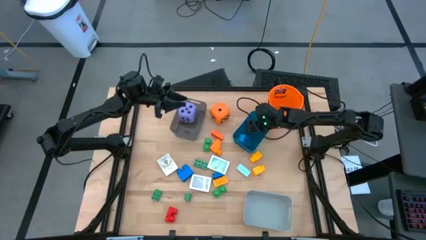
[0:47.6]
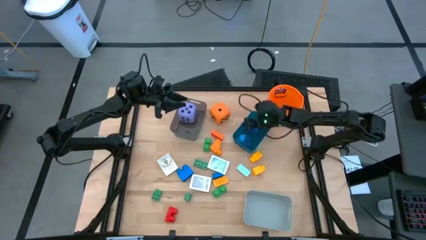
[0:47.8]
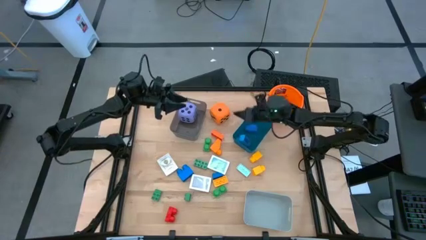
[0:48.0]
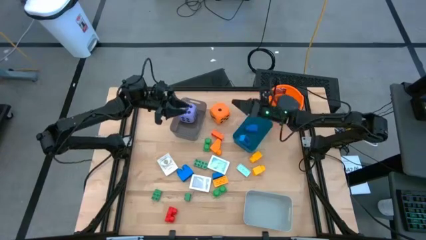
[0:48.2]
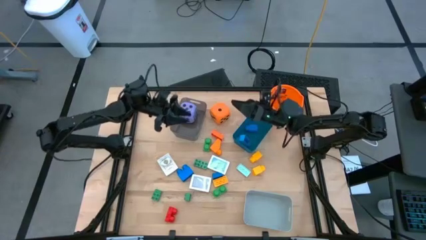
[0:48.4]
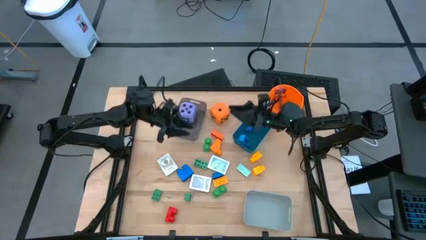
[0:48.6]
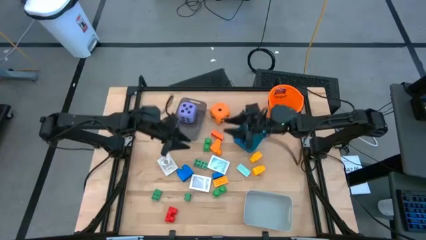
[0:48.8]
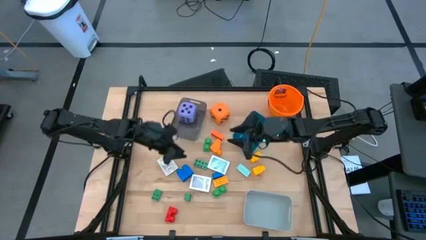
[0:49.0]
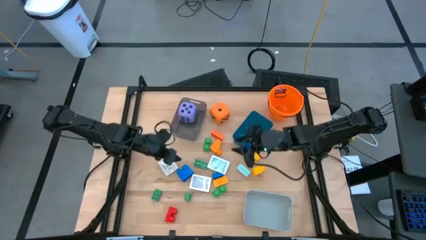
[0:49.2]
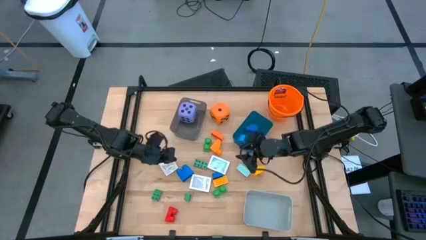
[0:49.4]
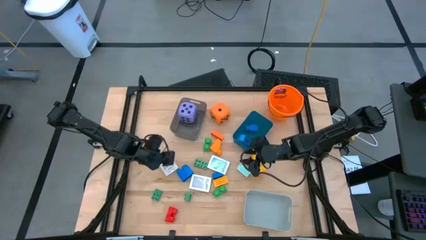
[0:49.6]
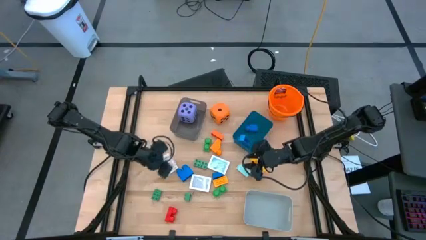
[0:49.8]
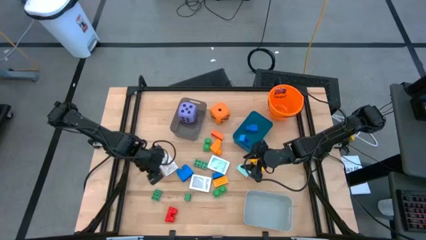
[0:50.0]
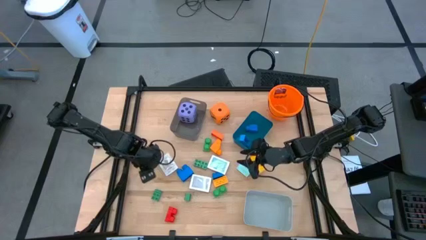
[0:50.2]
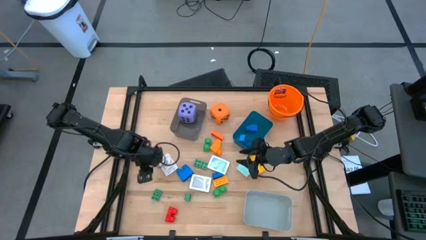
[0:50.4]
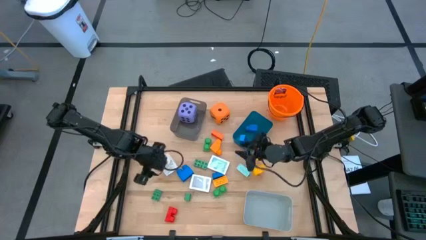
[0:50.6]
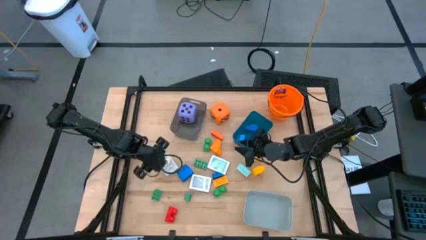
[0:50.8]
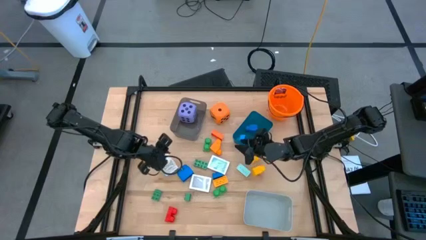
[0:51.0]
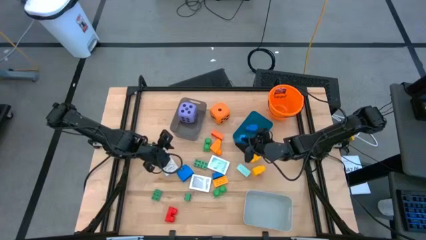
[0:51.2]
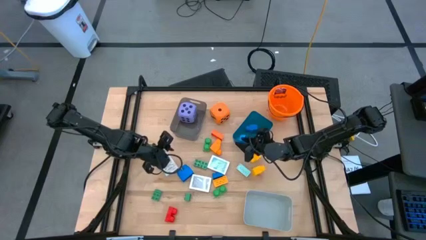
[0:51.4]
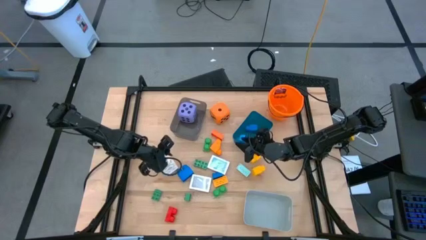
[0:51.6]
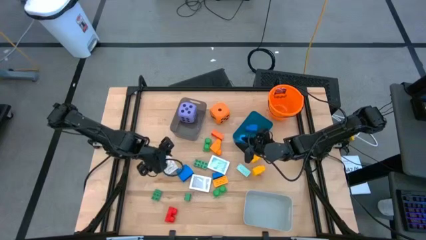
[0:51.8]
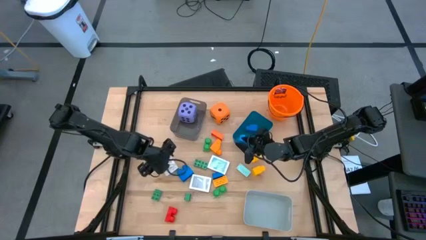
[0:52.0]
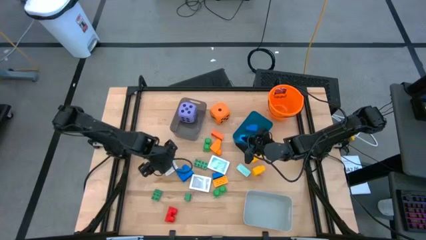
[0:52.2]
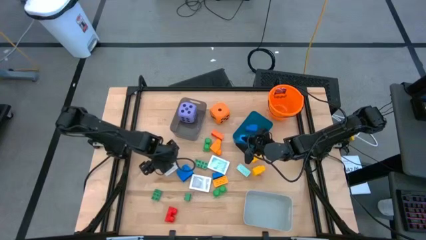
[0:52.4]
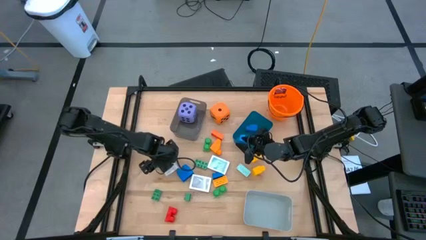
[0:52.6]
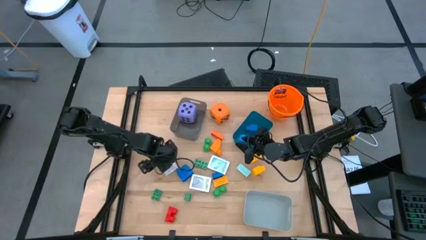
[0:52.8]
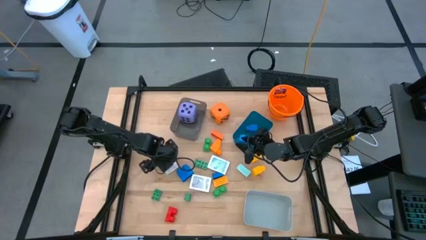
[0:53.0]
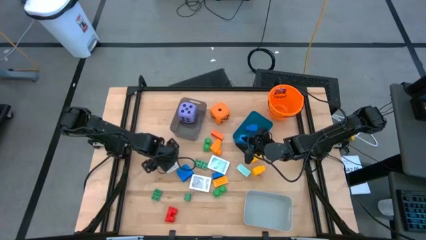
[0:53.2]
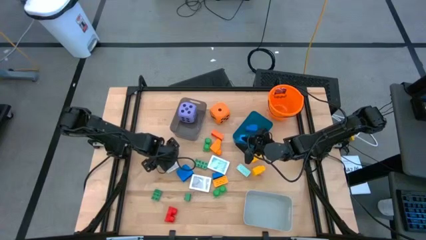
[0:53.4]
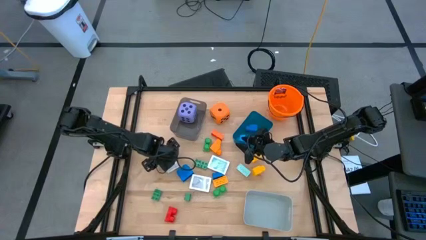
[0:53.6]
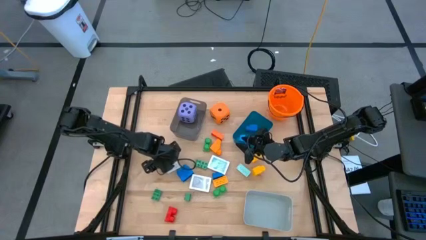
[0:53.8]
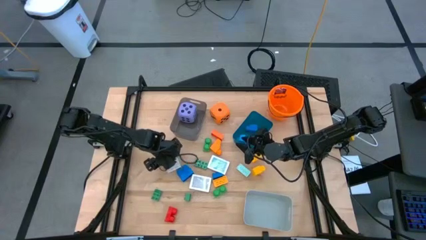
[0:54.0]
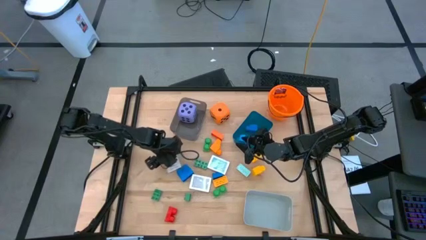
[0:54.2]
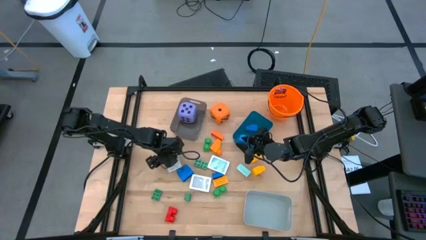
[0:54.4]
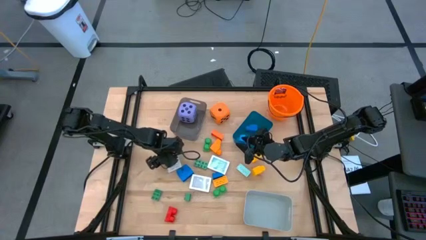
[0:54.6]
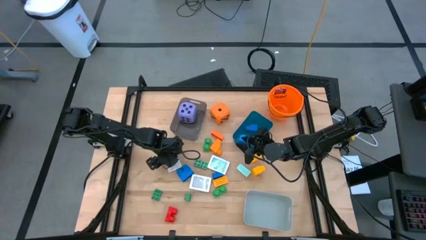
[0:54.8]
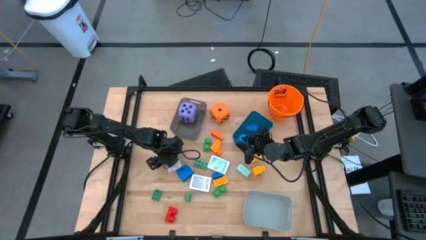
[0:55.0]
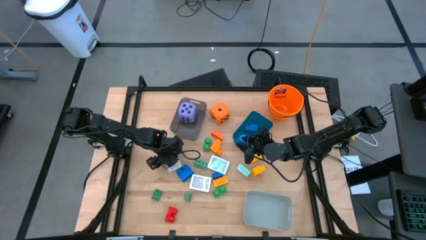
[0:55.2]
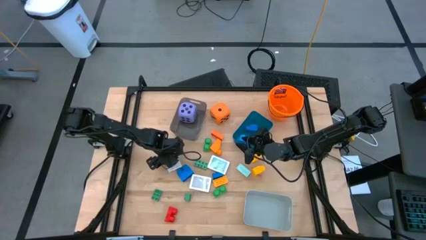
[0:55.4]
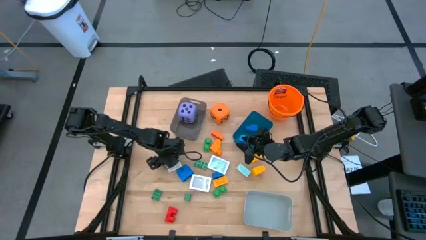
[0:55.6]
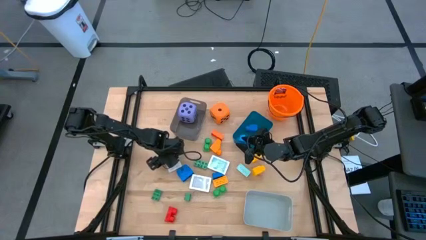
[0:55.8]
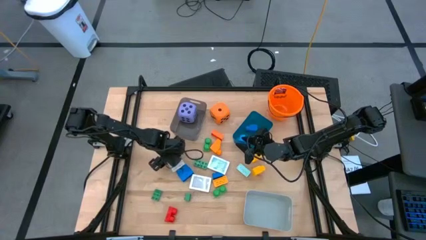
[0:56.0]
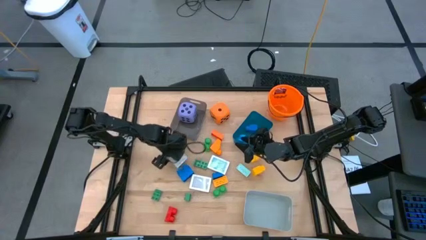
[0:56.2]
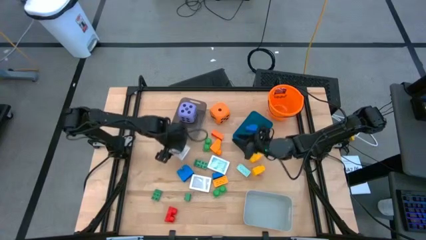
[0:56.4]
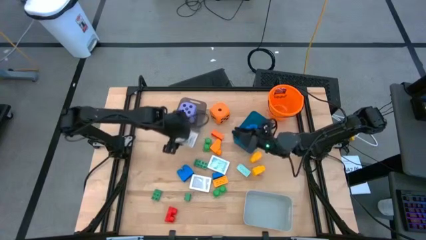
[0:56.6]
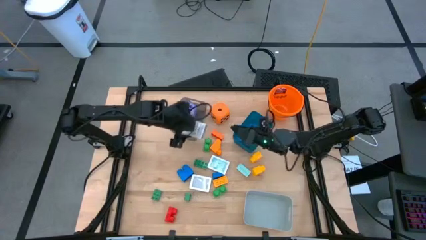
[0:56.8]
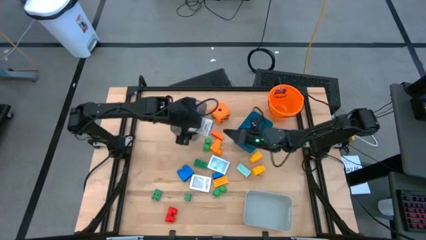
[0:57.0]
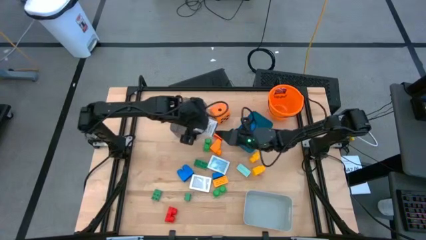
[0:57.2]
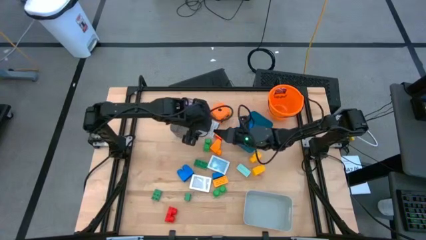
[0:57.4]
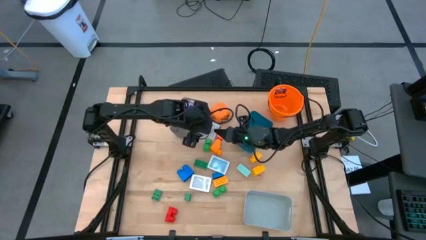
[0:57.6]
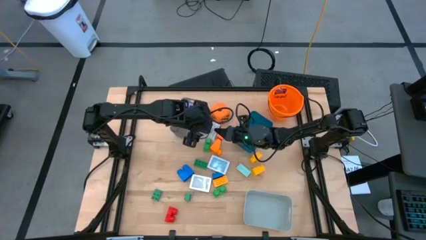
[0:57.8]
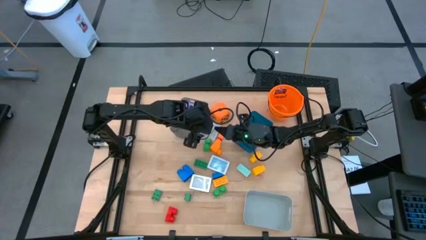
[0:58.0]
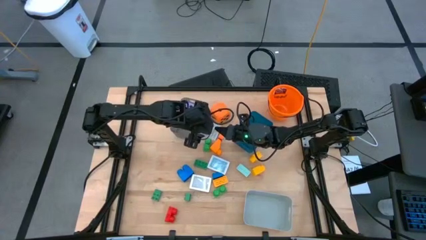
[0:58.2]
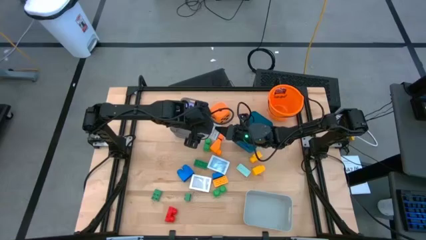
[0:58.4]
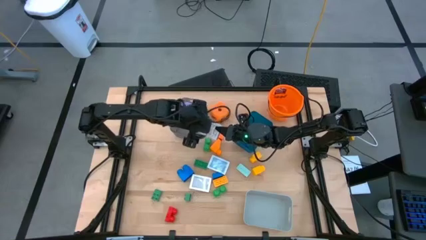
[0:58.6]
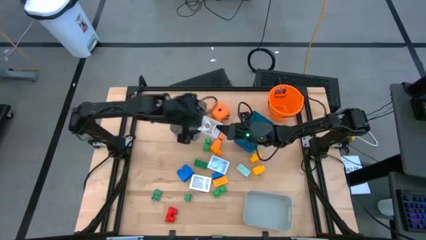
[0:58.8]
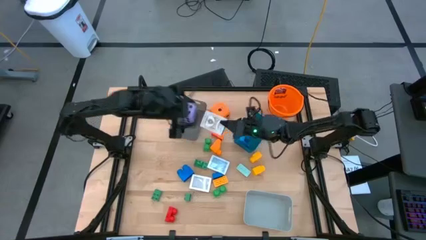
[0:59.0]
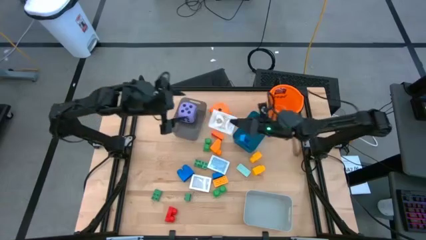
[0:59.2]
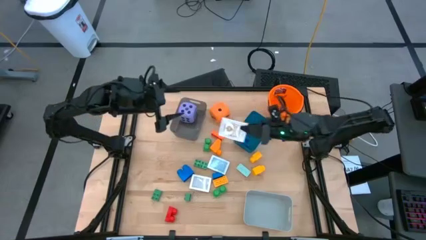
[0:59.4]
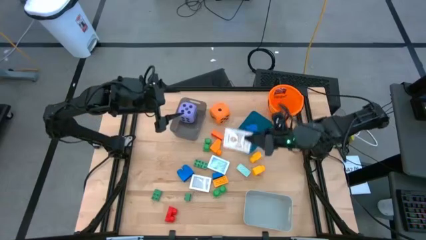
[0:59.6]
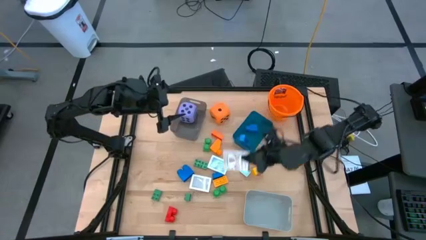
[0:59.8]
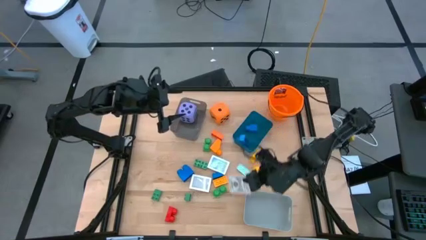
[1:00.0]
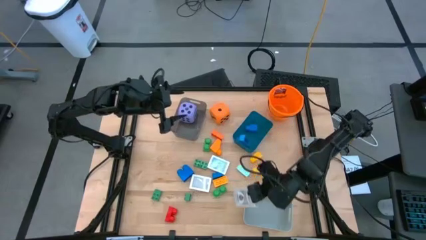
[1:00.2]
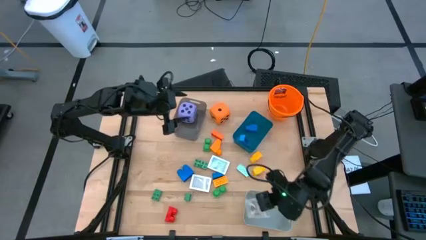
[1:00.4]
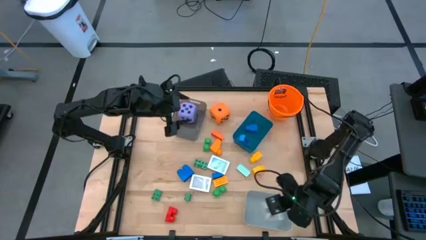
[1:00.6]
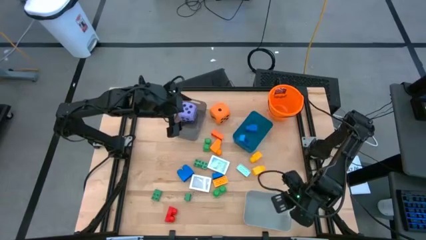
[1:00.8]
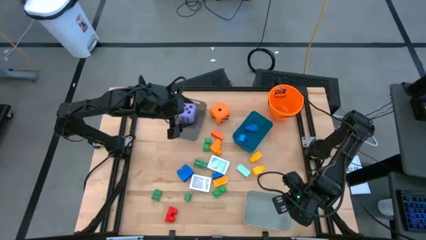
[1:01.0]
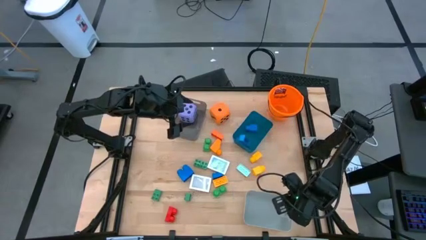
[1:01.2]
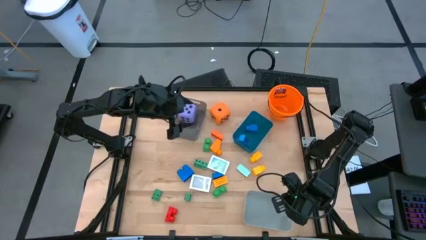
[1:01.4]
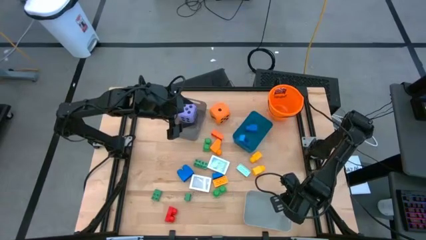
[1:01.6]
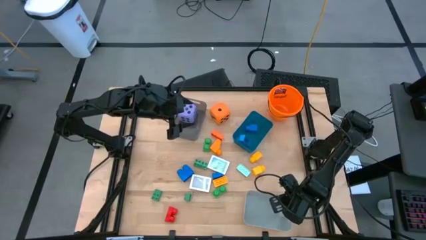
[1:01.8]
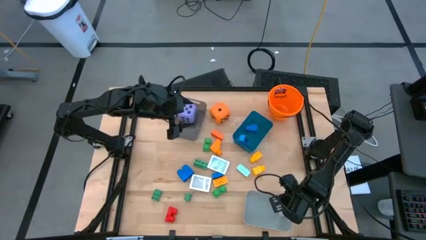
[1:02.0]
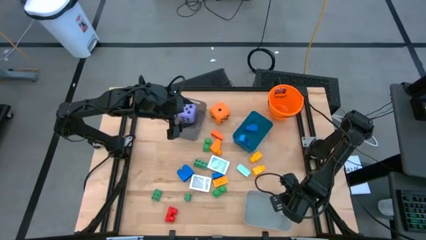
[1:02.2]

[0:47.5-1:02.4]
Task: Pick & Place Toys
Put the gold deck of cards into the gray bin
